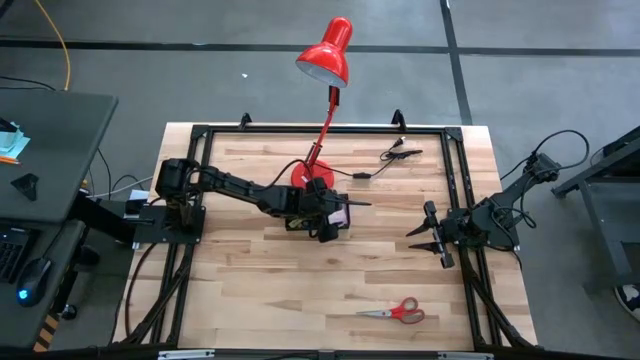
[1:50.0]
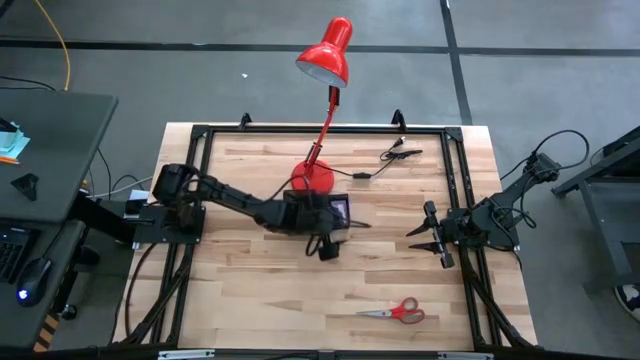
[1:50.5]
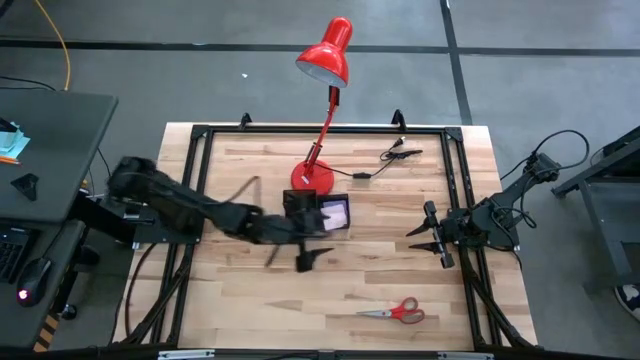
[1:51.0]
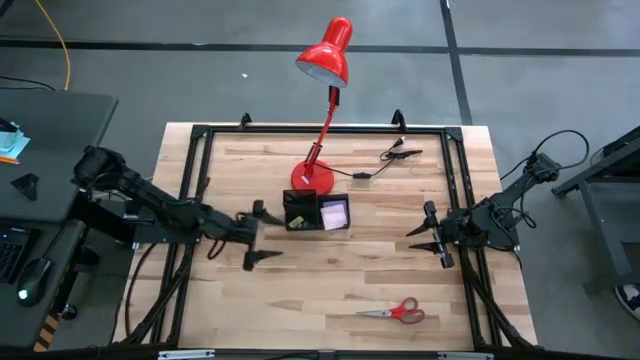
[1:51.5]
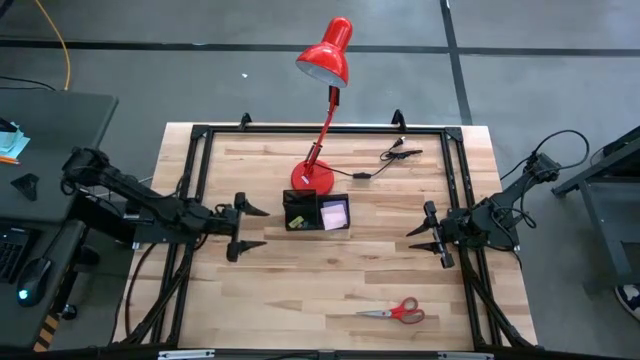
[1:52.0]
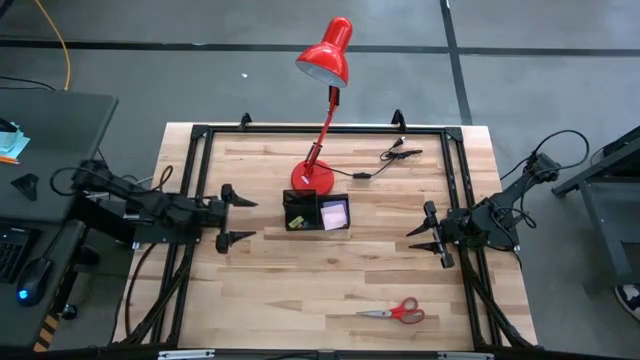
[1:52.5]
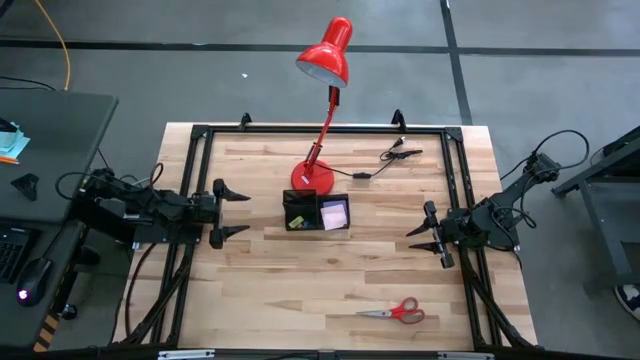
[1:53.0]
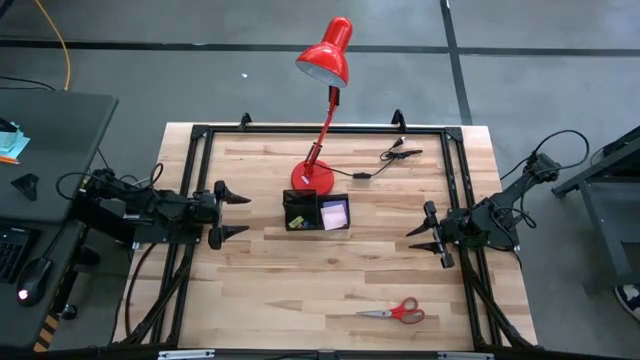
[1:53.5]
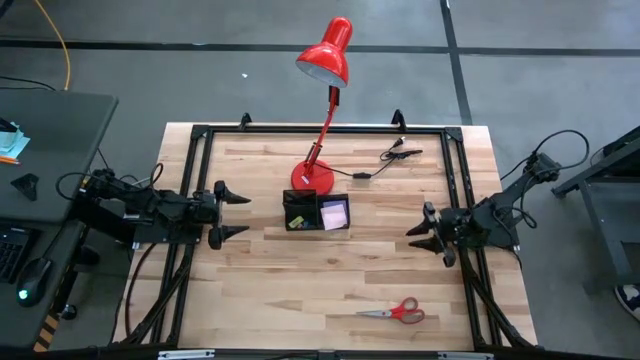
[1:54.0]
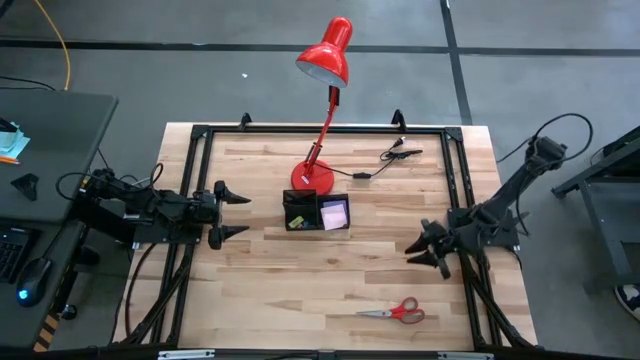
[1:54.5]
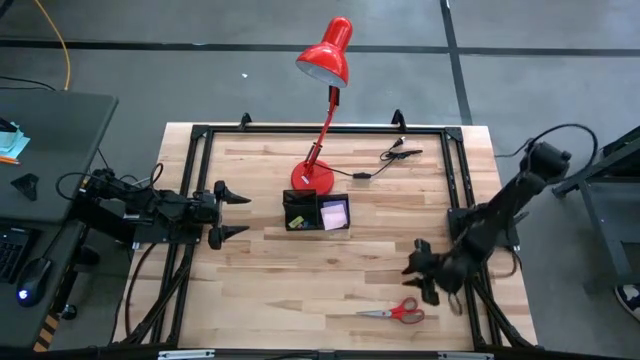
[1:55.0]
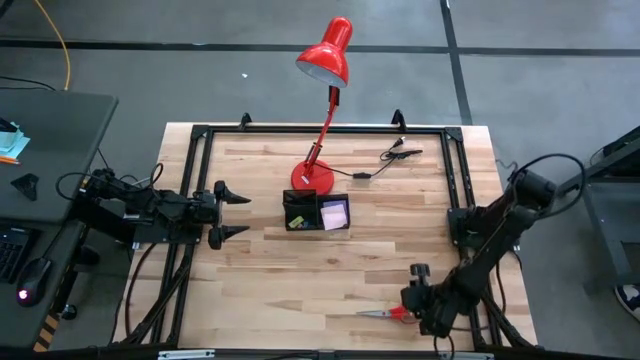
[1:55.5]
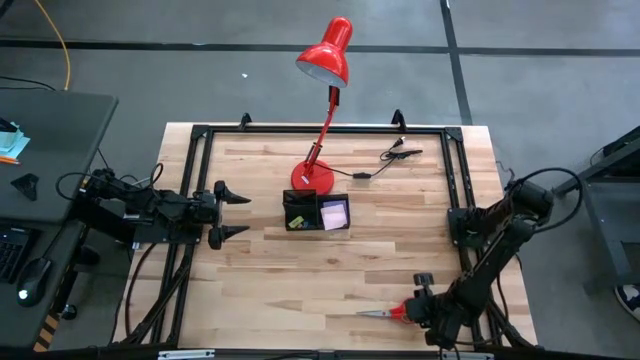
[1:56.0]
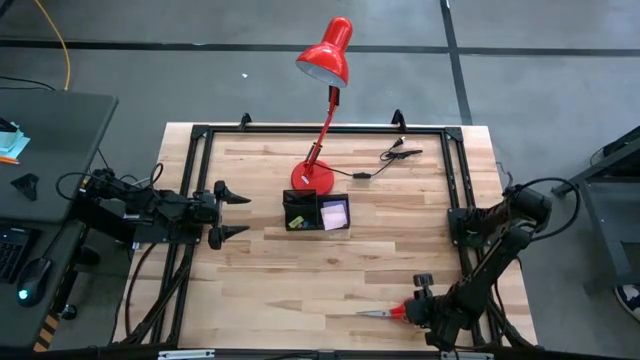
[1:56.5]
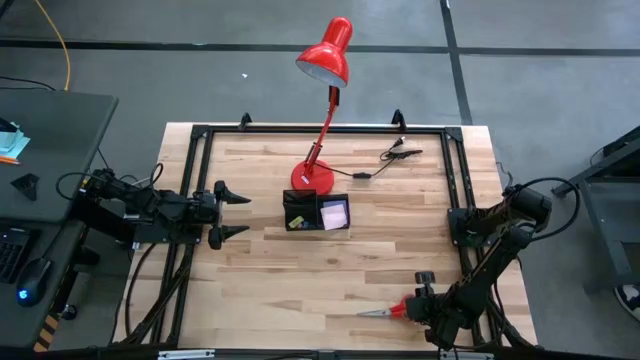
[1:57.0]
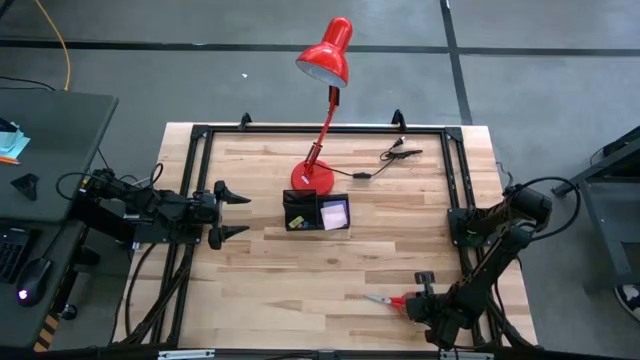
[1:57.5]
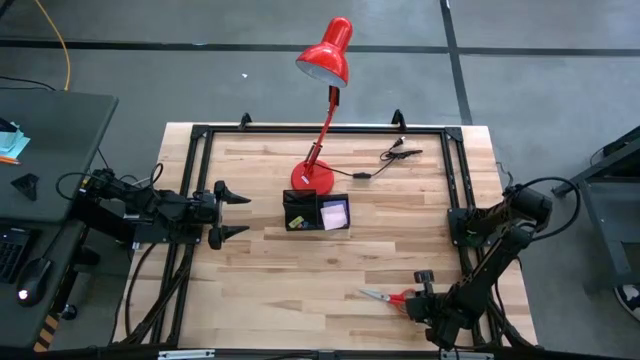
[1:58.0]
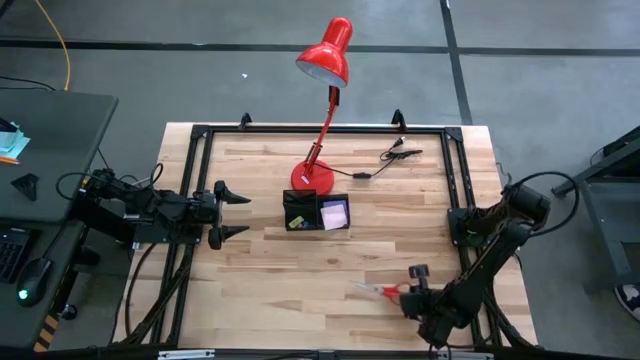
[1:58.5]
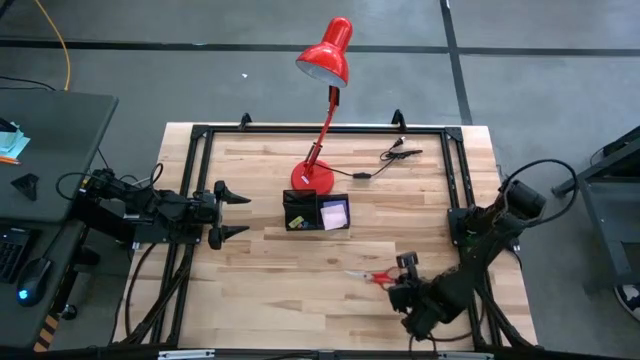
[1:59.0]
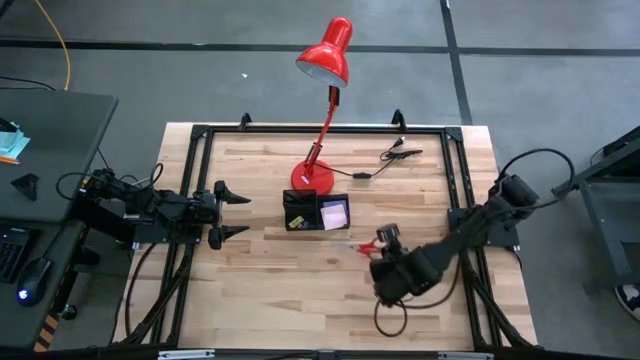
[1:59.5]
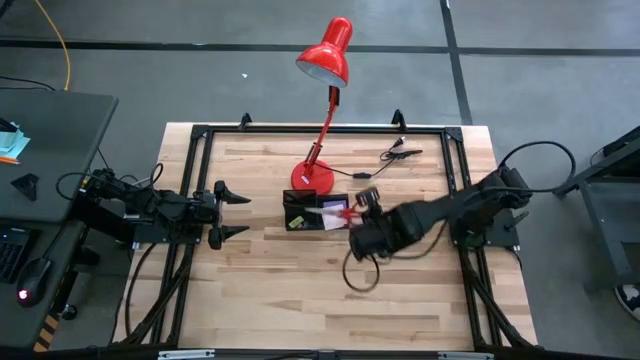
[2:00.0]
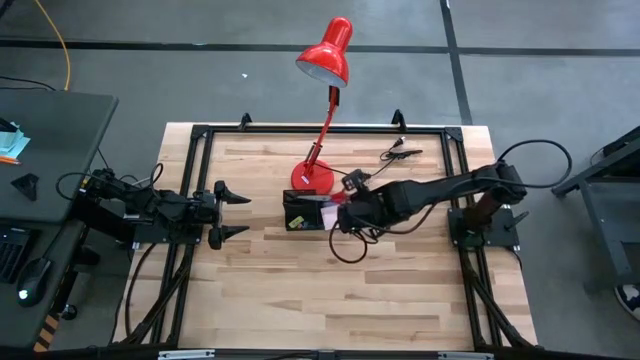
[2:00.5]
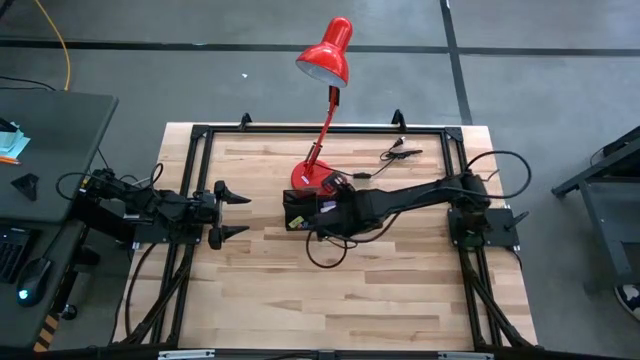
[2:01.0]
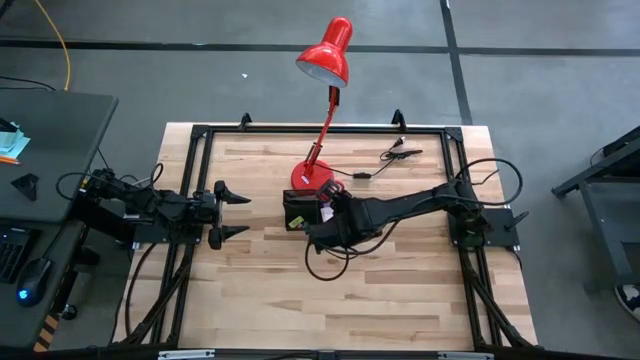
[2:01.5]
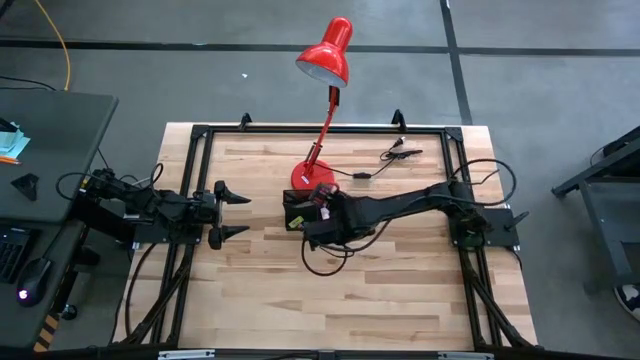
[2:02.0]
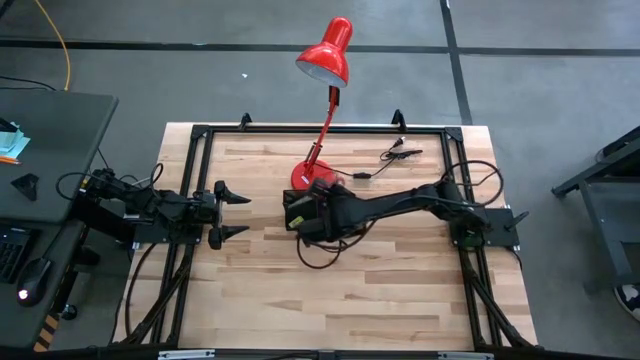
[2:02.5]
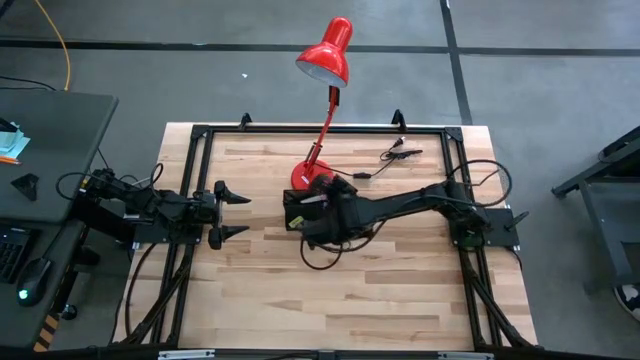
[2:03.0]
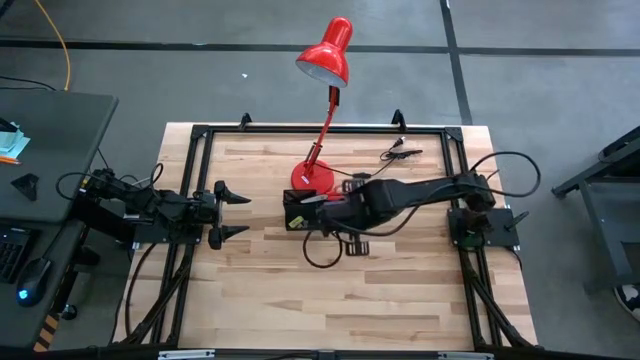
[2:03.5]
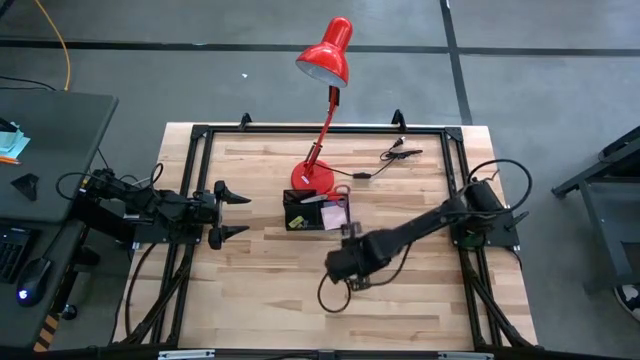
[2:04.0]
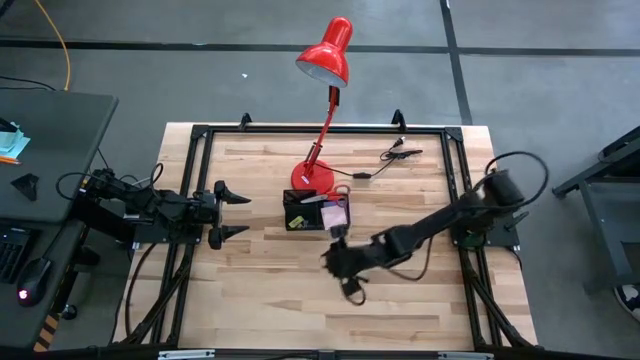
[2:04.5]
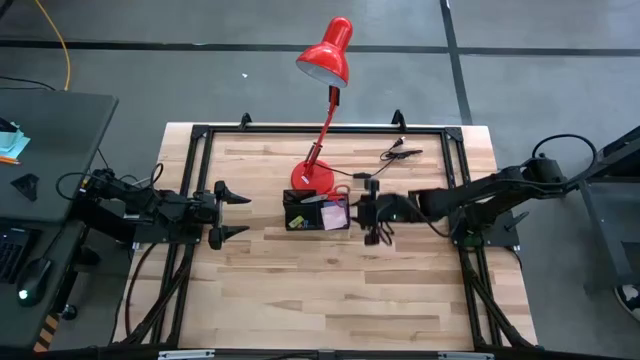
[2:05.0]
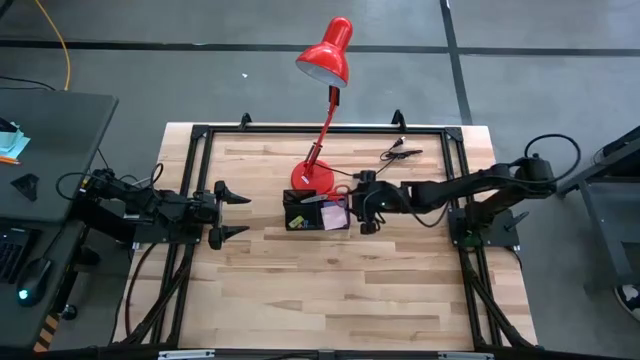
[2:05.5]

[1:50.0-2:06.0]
Task: Pick and place office supplies into organizer
Put the red scissors into the black desk organizer

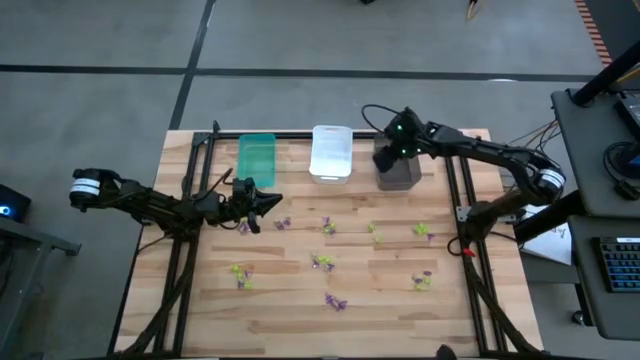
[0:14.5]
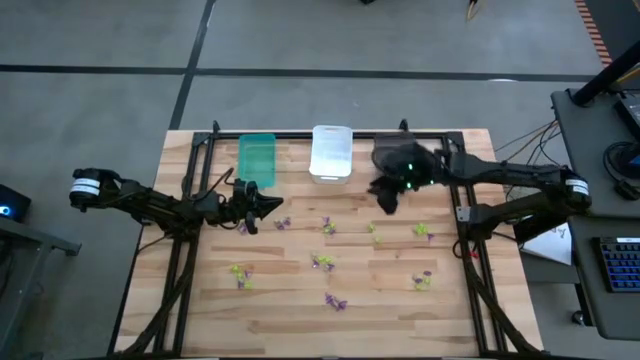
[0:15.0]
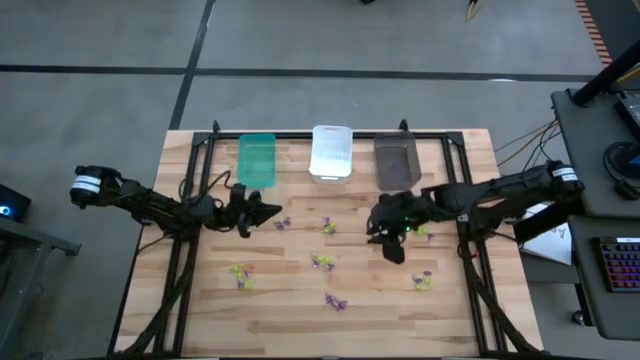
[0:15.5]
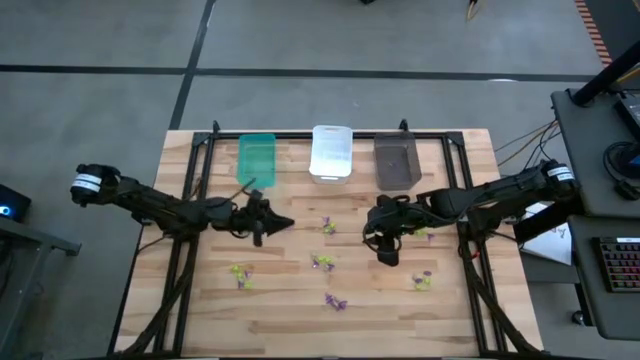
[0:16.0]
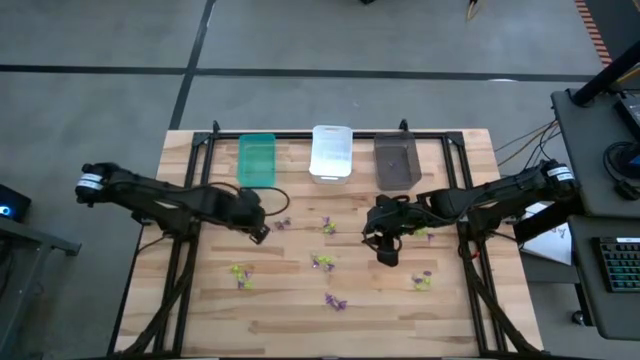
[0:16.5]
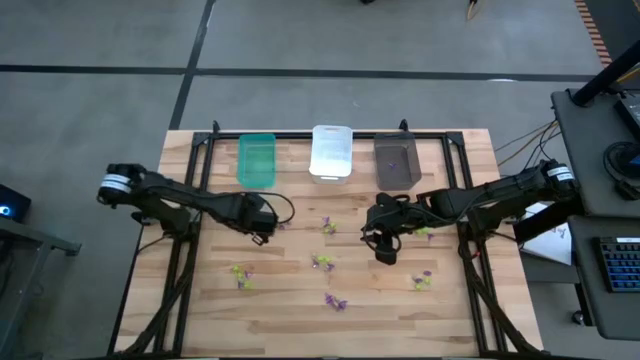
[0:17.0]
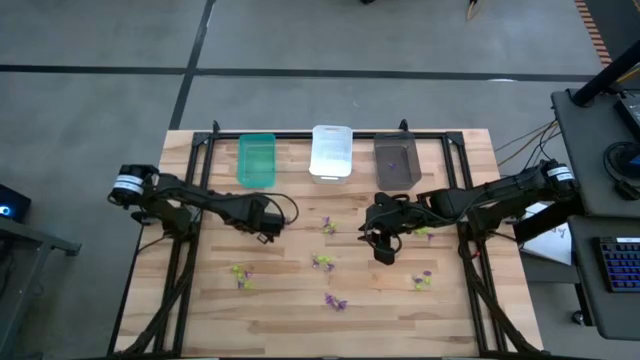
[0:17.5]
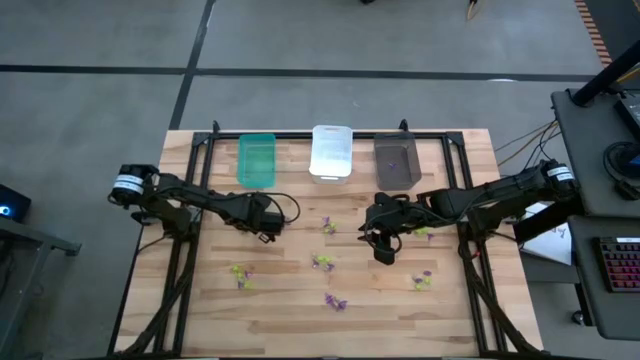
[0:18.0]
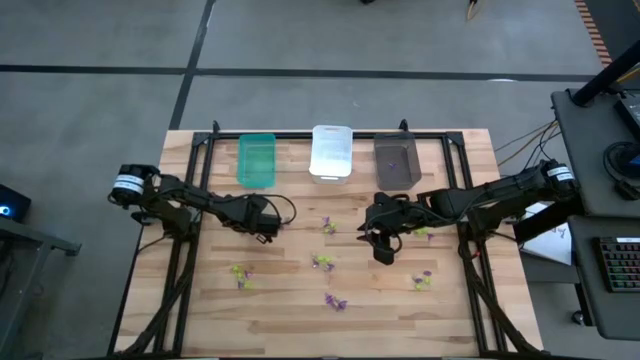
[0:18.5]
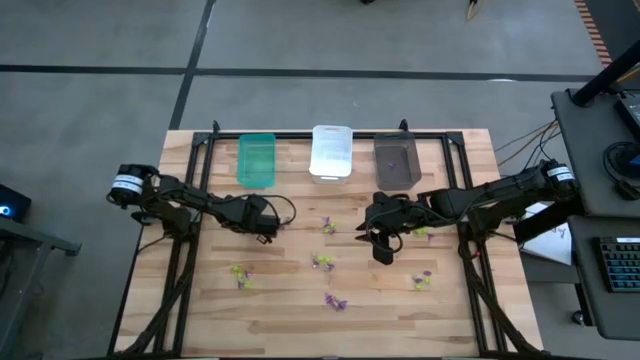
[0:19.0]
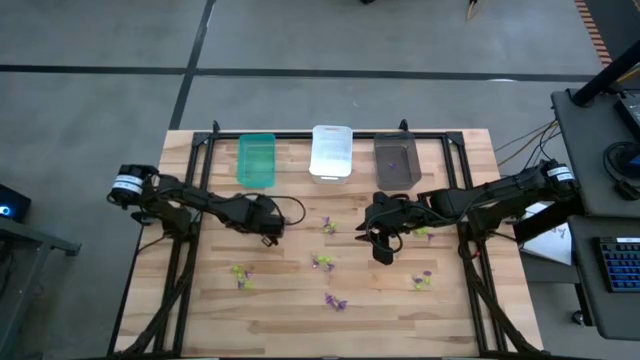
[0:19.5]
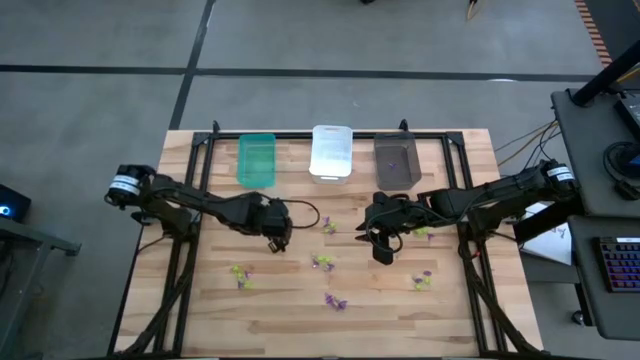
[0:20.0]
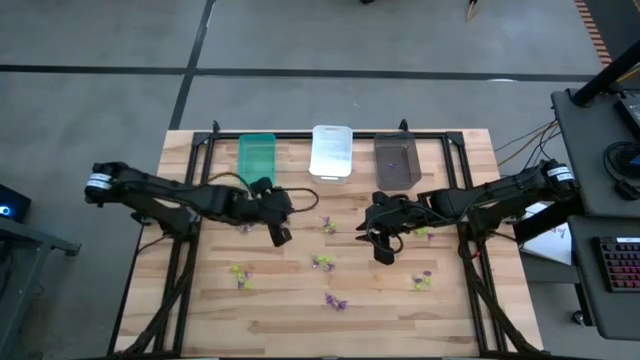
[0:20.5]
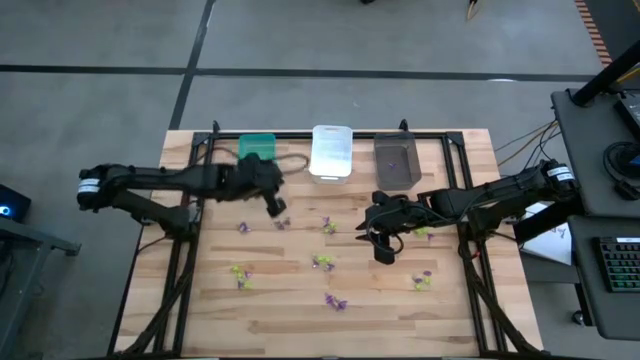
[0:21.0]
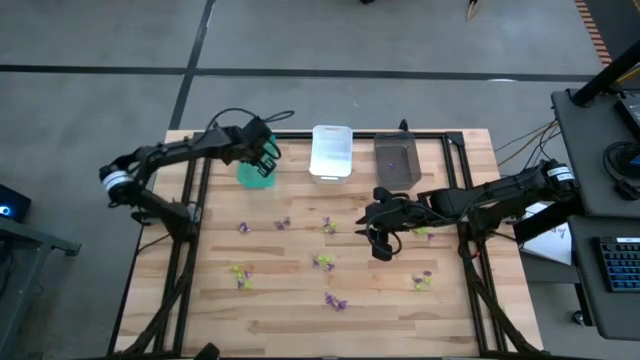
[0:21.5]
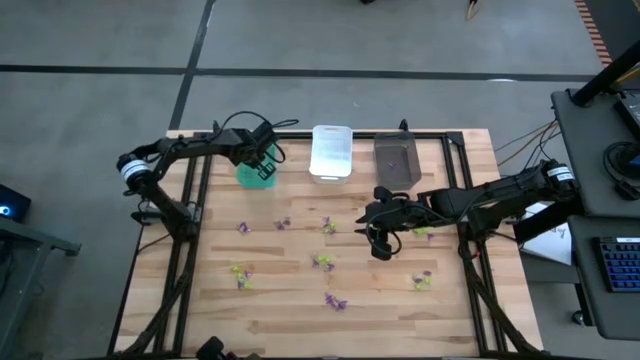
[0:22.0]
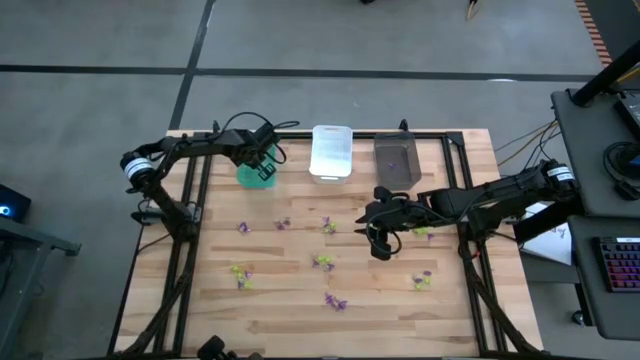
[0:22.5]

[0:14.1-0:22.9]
Task: Sort Halloween decoration
Put the green spider toy into the blue bin
